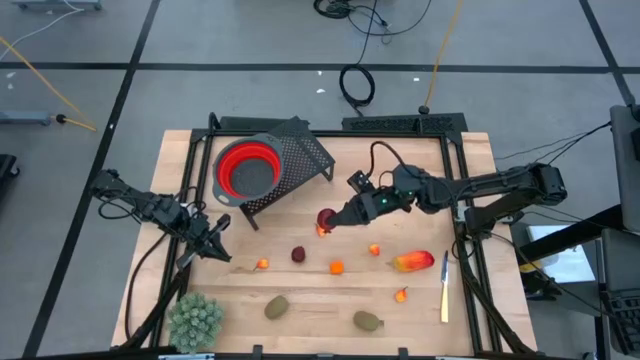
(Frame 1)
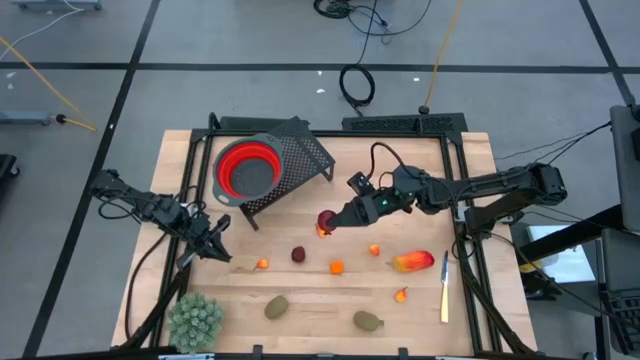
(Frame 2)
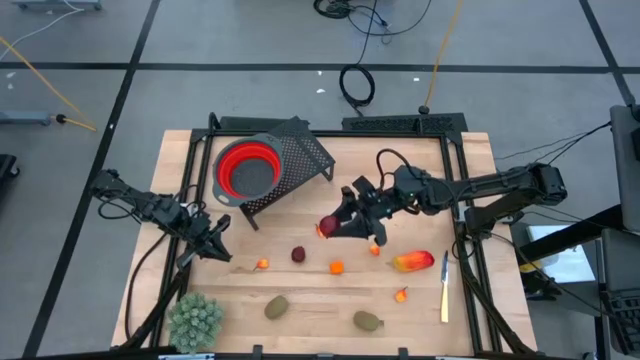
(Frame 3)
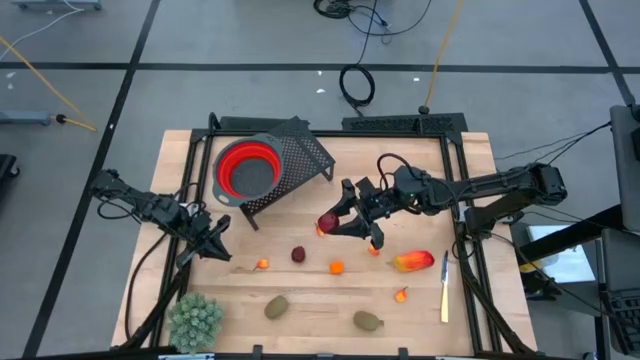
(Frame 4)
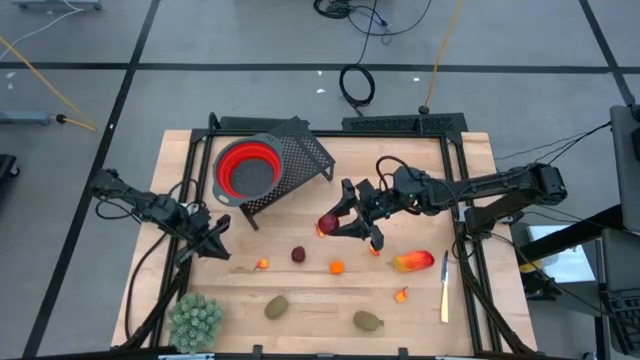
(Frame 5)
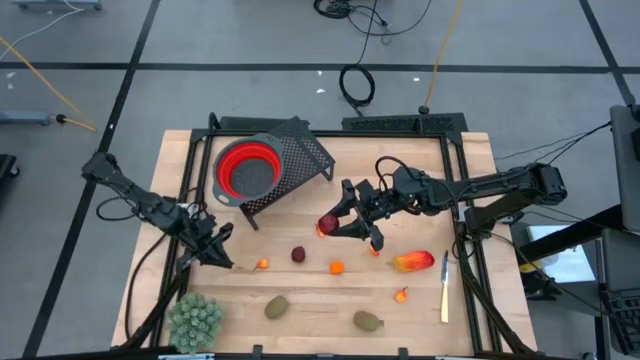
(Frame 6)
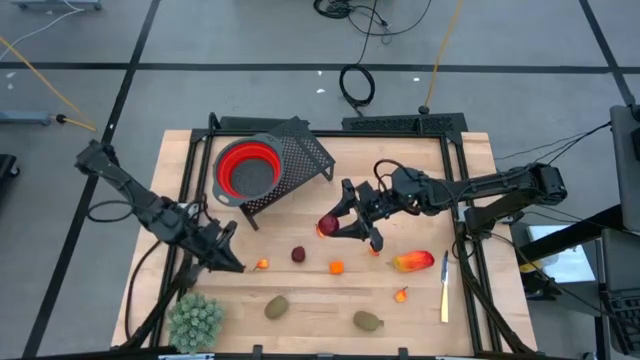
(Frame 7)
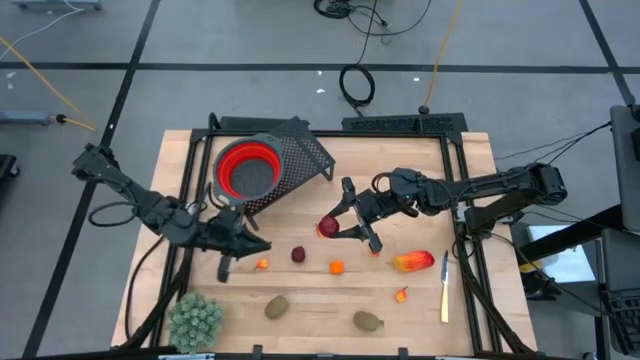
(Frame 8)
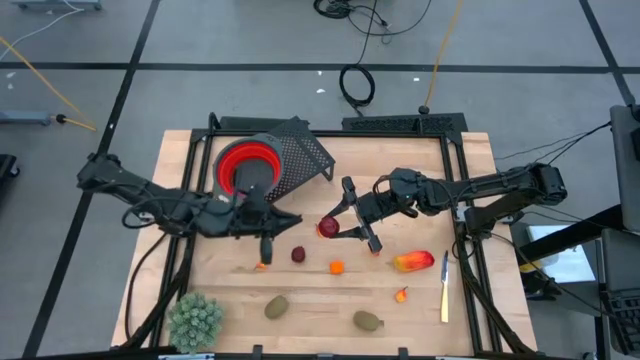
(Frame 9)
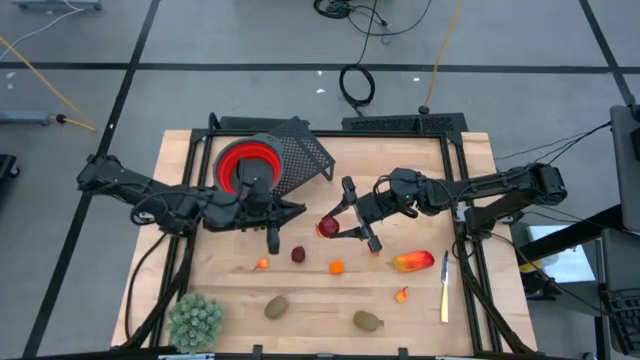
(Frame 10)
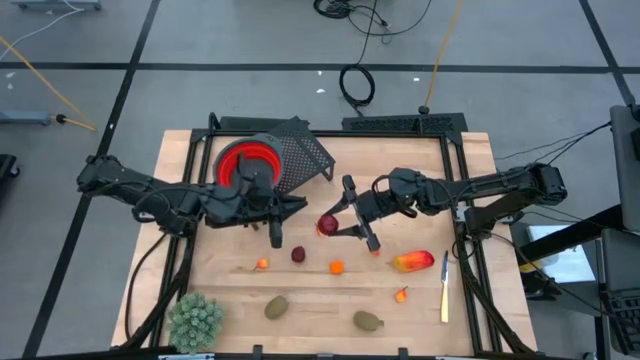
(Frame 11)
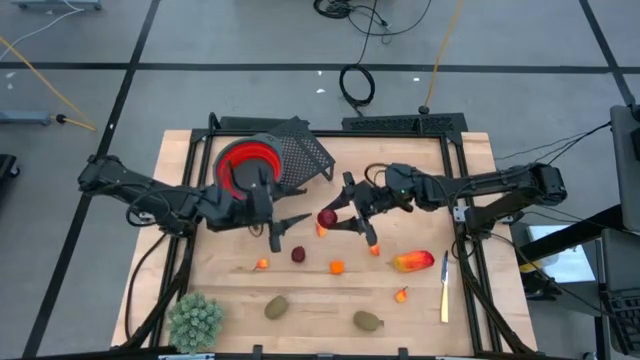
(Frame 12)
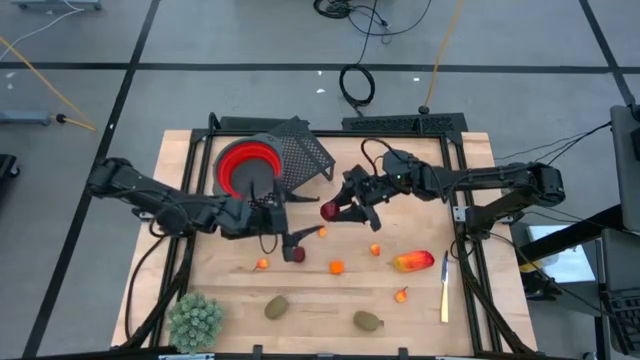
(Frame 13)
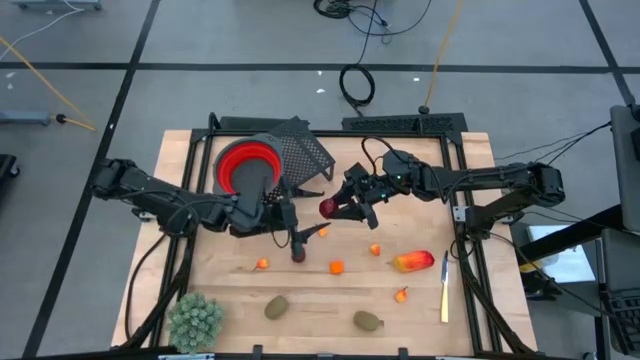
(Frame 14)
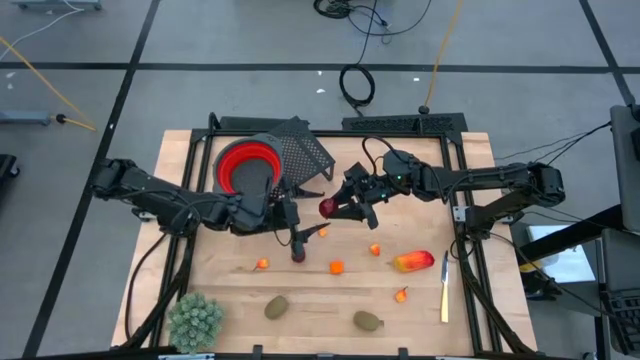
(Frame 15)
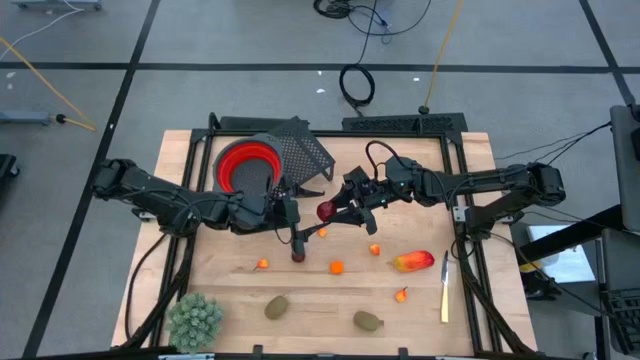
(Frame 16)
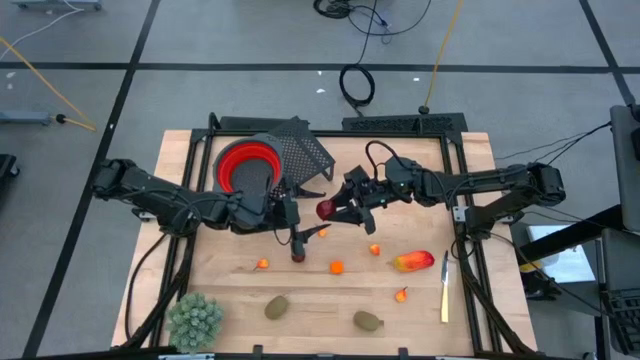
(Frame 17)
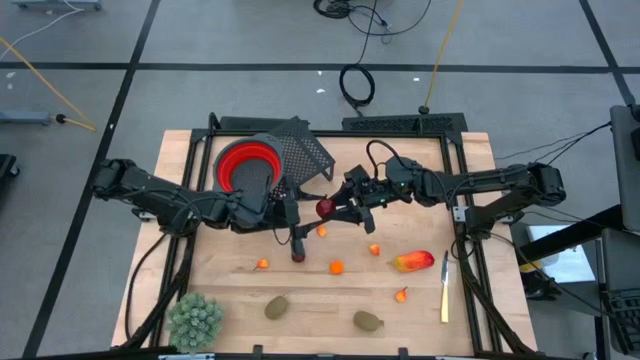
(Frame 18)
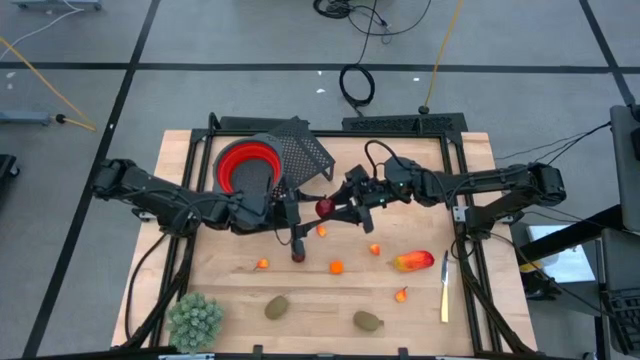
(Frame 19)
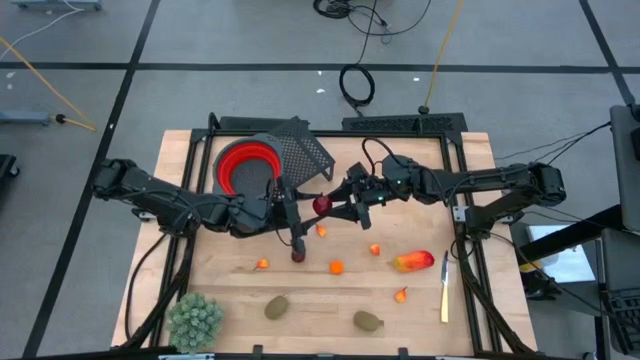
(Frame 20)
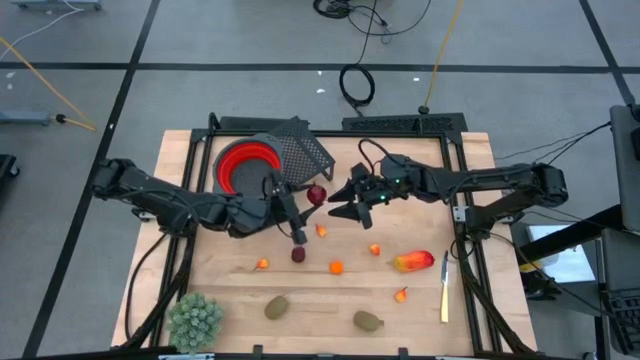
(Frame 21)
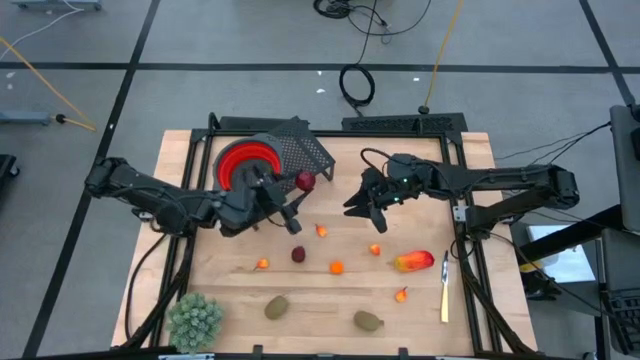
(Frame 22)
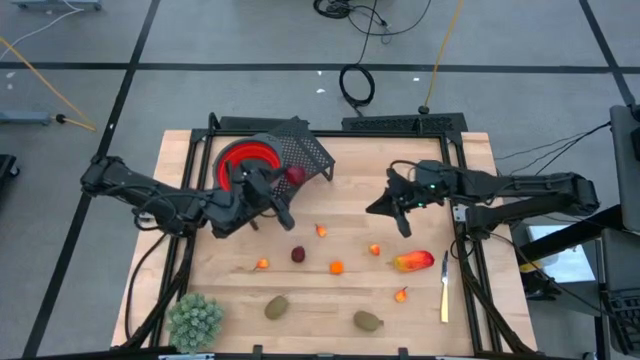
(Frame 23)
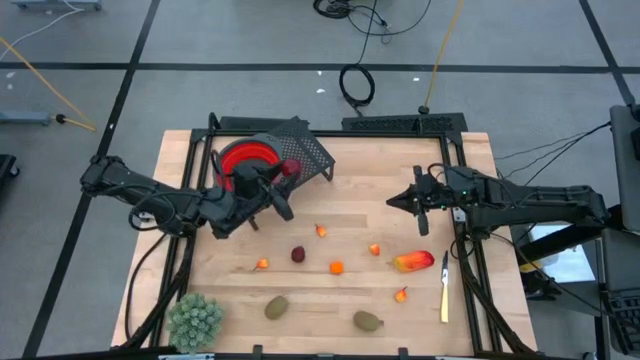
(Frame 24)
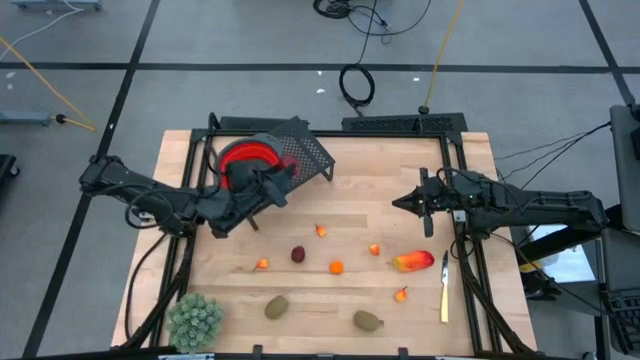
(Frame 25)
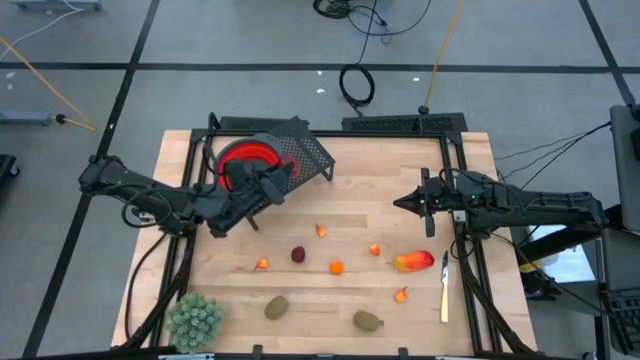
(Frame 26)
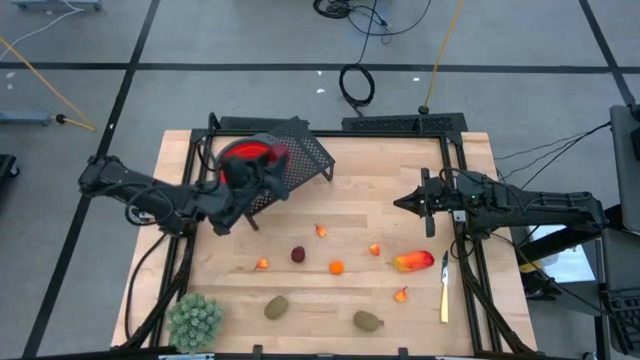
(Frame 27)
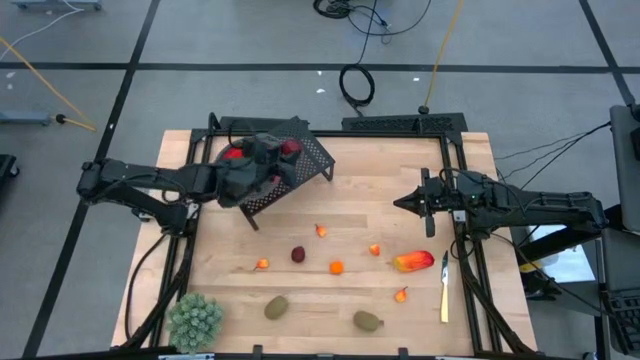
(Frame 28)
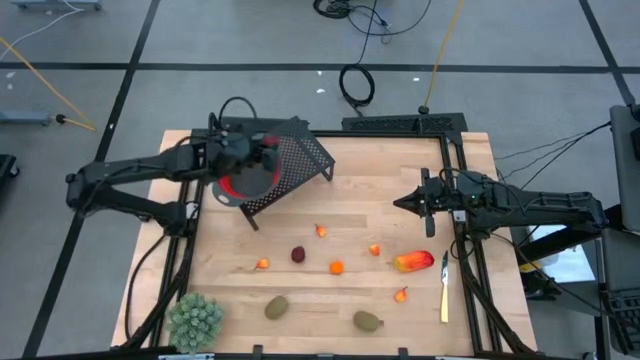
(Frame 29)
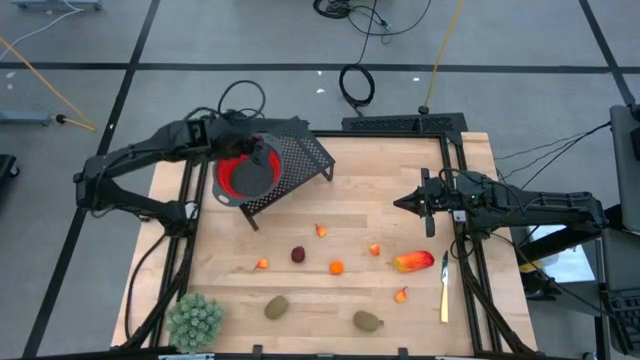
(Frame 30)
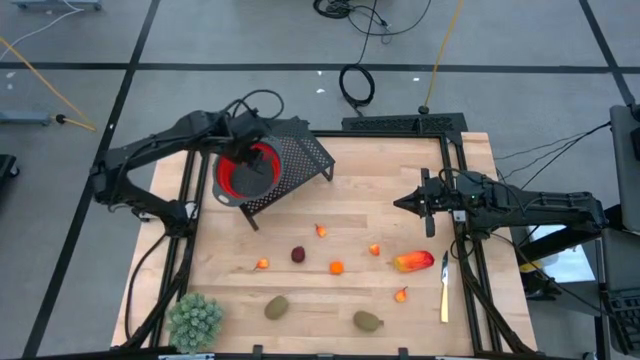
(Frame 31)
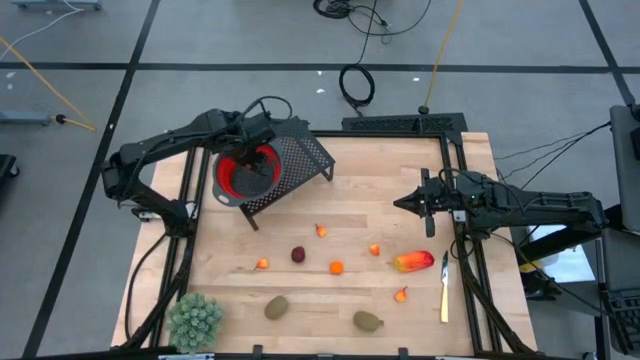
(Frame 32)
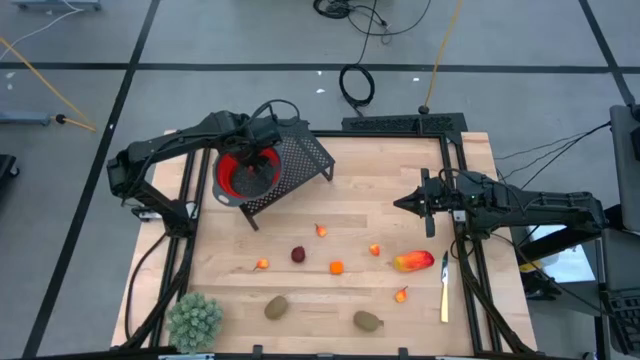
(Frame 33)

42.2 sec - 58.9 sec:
Task: Pick & Place Fruit
Put the pomegranate into the red strainer bowl on the shelf

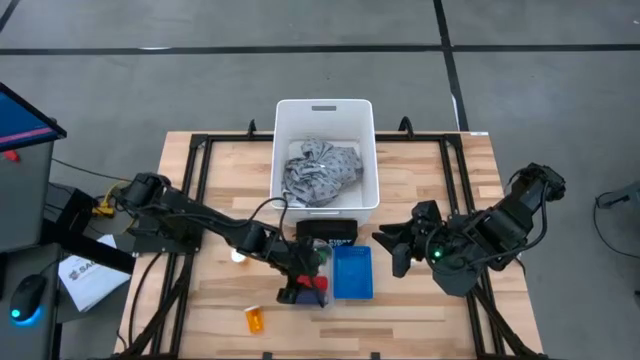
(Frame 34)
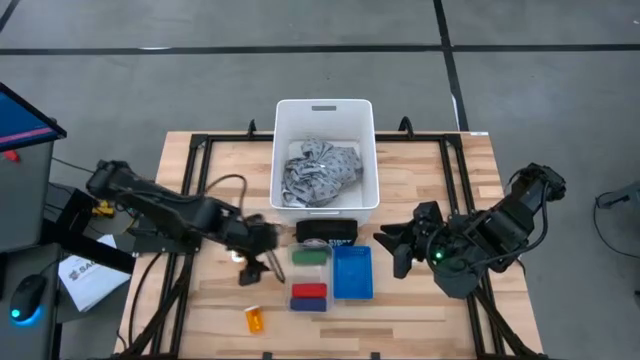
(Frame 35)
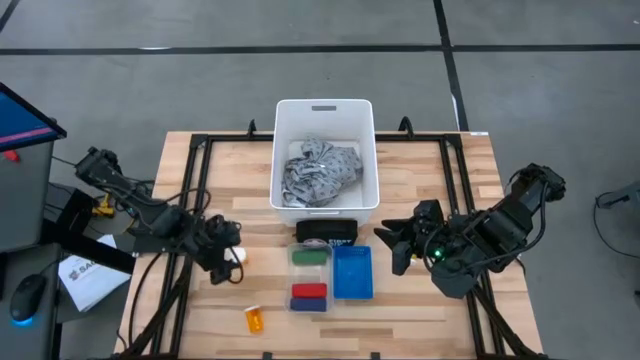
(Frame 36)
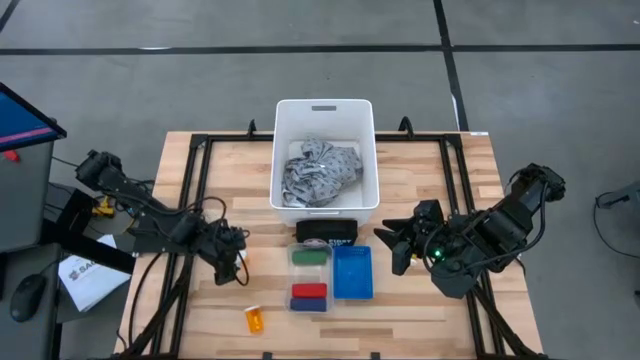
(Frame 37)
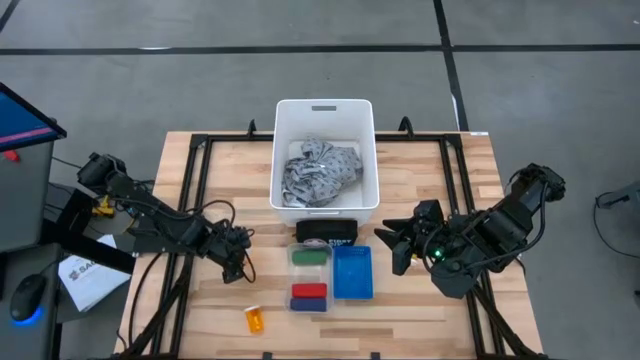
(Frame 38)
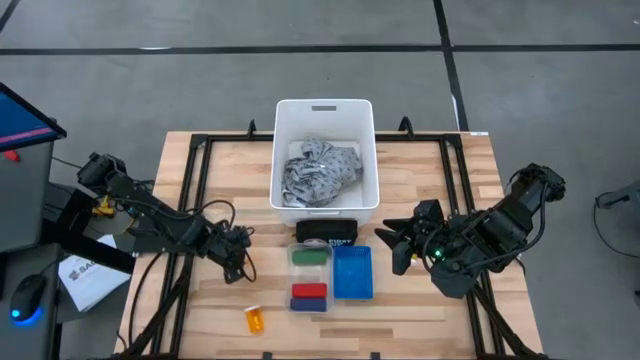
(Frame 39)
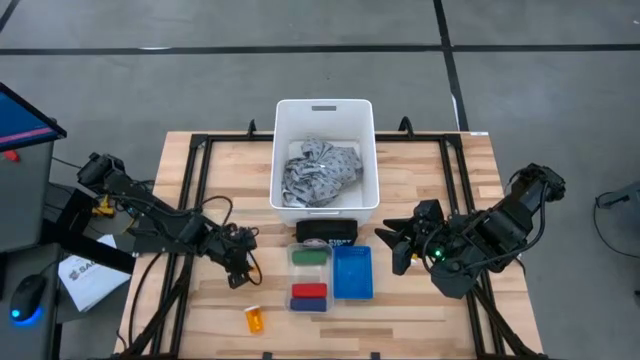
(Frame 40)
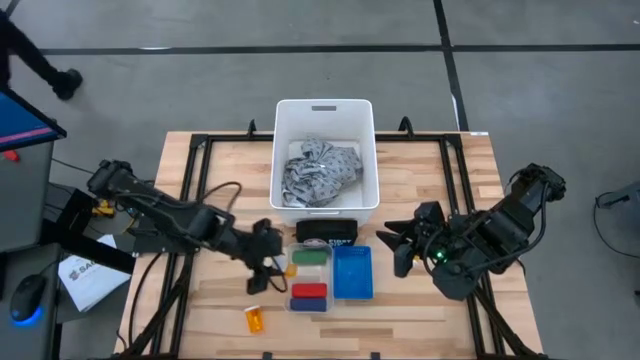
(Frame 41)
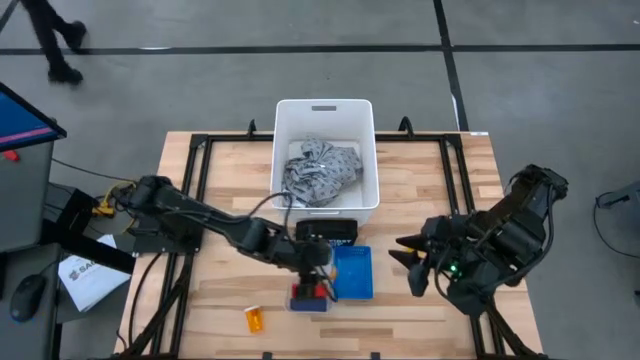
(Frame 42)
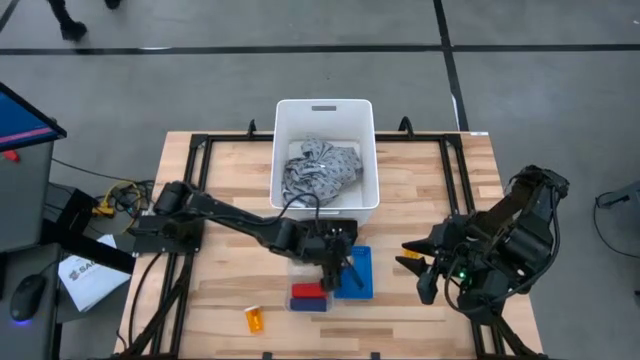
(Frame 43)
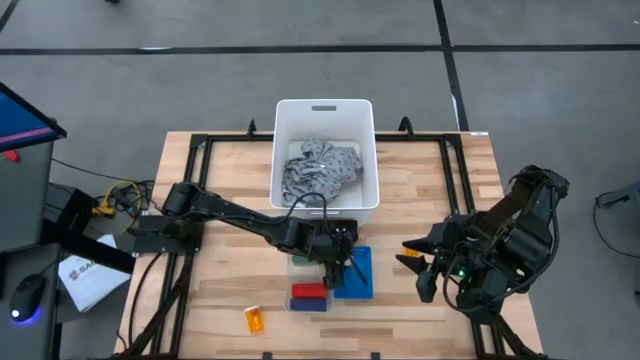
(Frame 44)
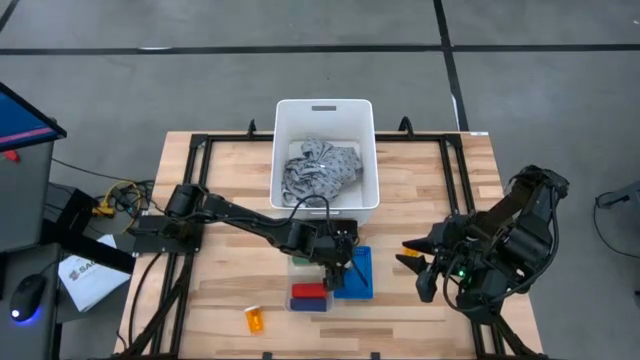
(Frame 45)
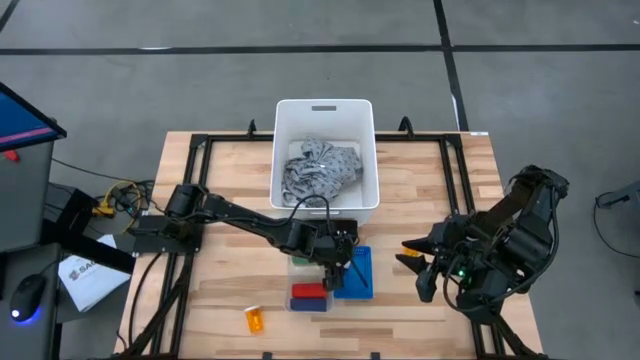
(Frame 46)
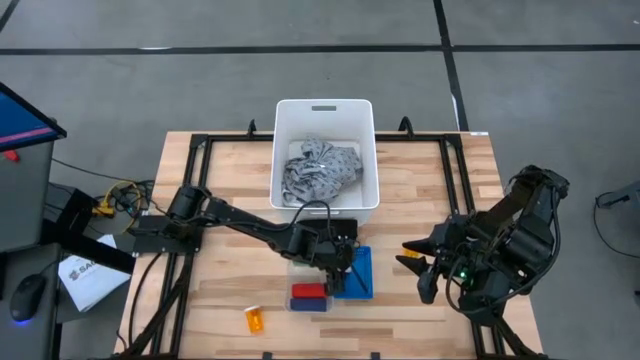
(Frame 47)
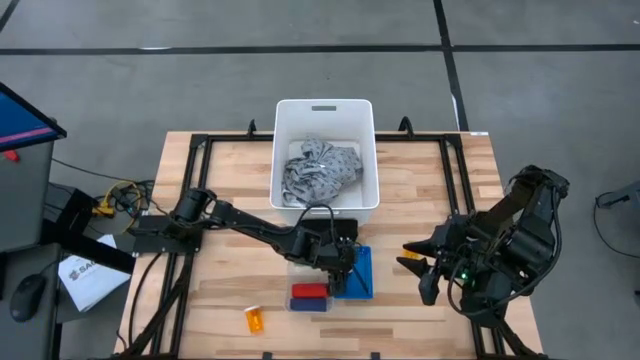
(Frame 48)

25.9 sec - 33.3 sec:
Task: Pick & place medical supplies in basket/bin
Put the top left orange pill bottle into the blue bin
